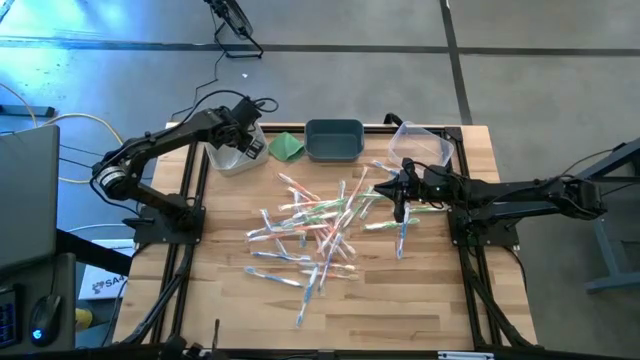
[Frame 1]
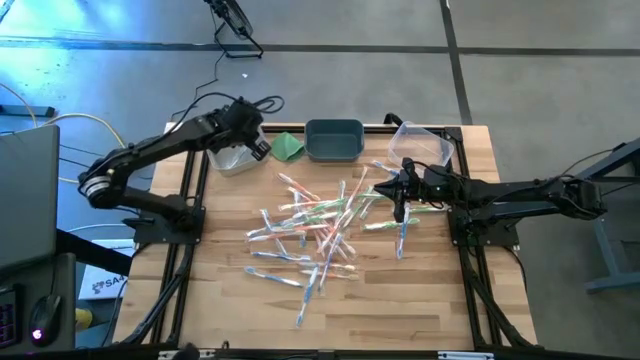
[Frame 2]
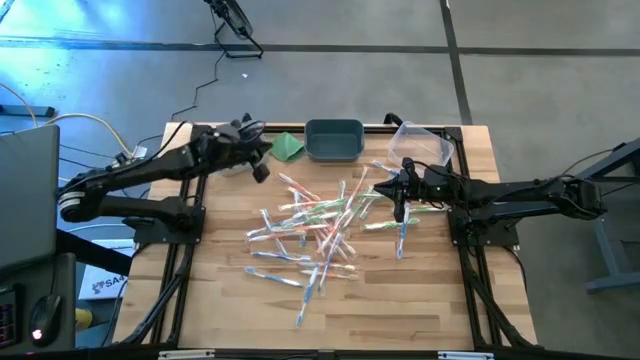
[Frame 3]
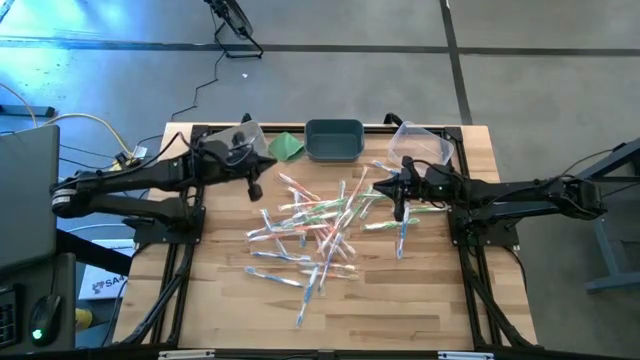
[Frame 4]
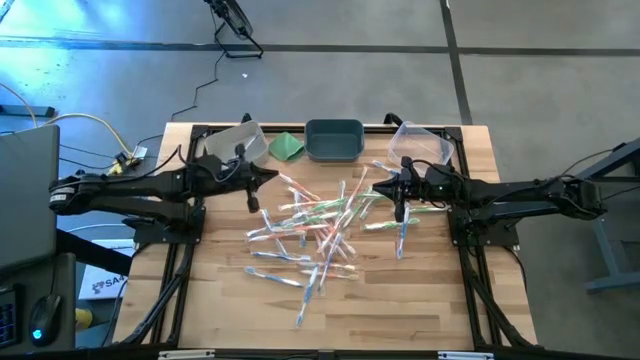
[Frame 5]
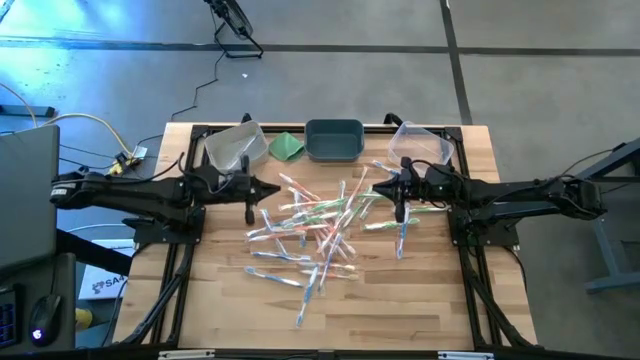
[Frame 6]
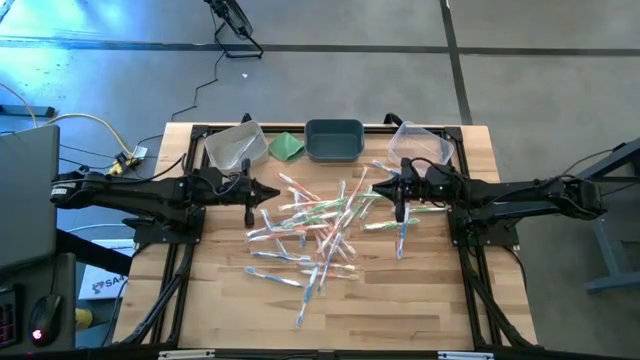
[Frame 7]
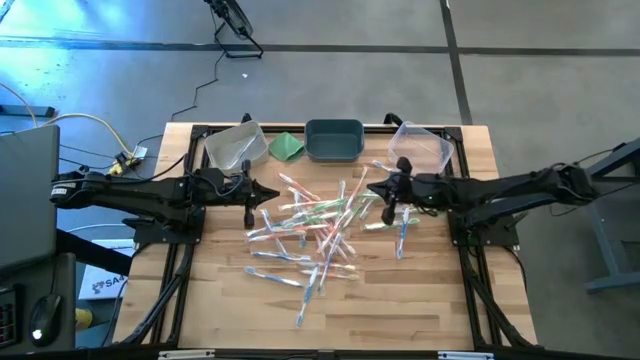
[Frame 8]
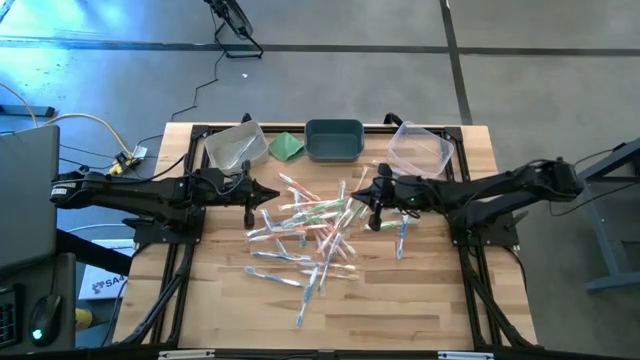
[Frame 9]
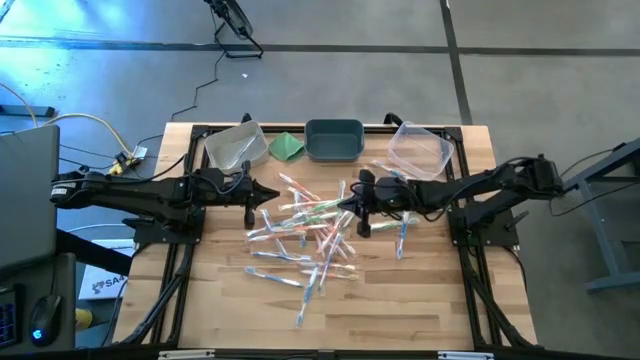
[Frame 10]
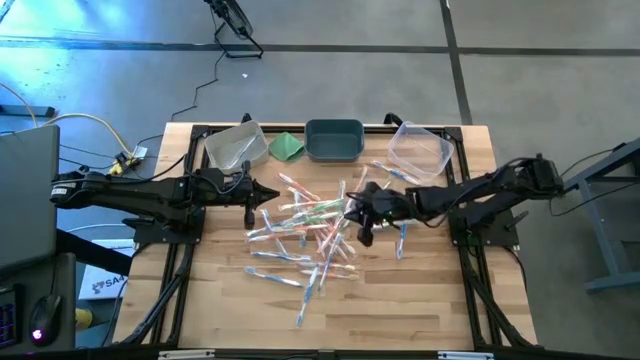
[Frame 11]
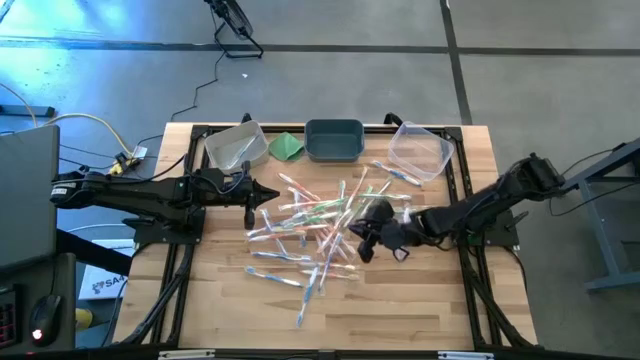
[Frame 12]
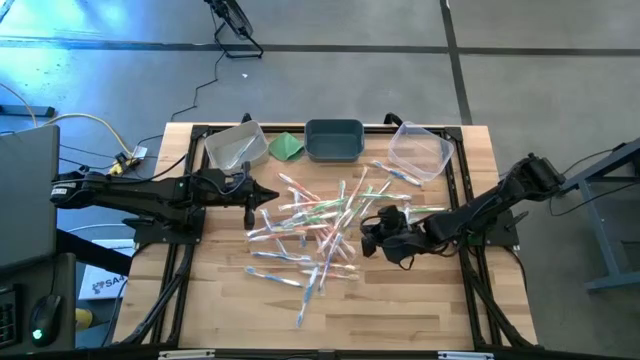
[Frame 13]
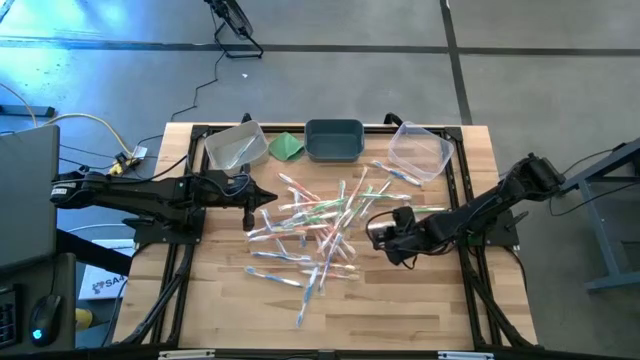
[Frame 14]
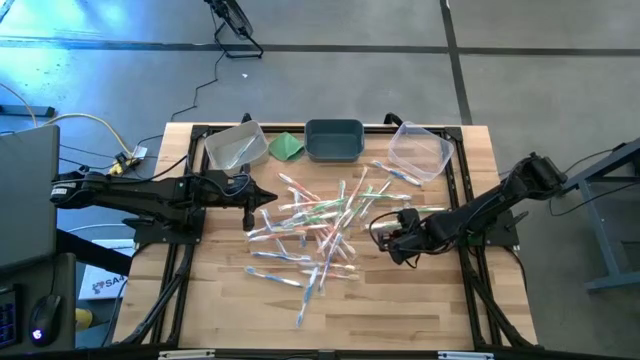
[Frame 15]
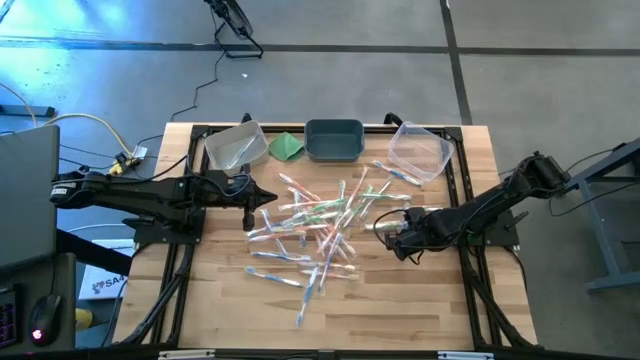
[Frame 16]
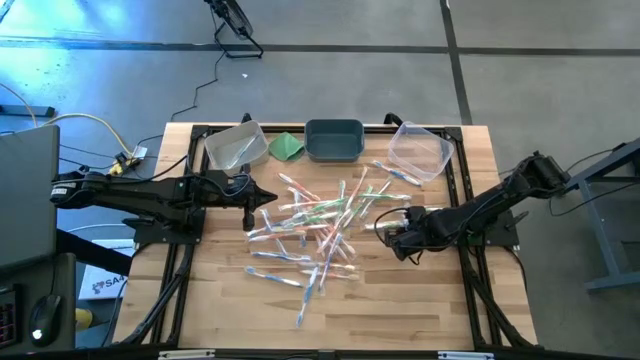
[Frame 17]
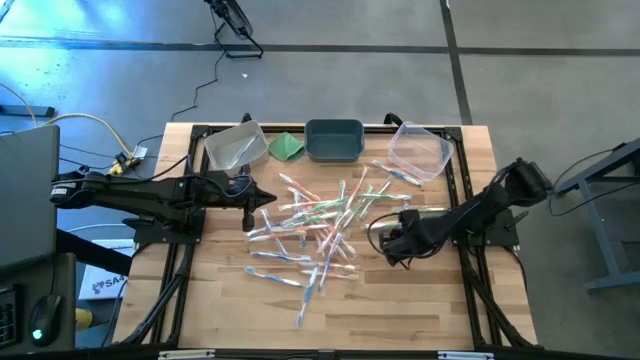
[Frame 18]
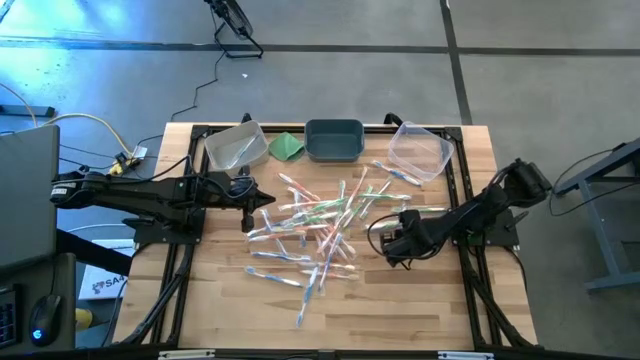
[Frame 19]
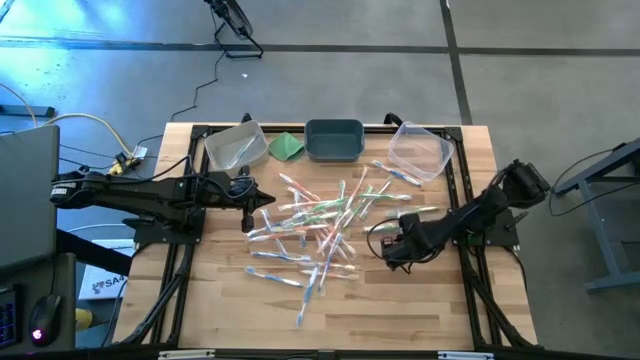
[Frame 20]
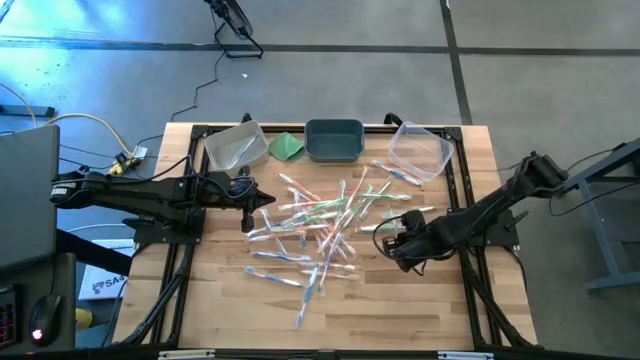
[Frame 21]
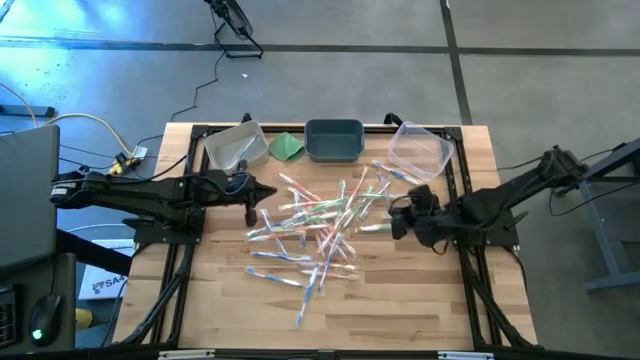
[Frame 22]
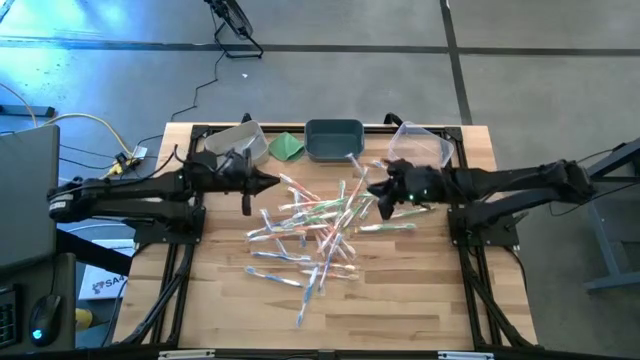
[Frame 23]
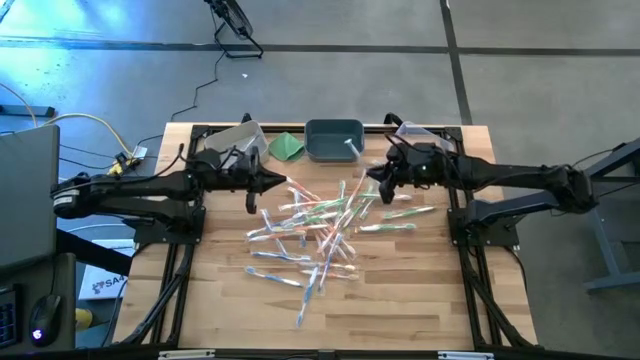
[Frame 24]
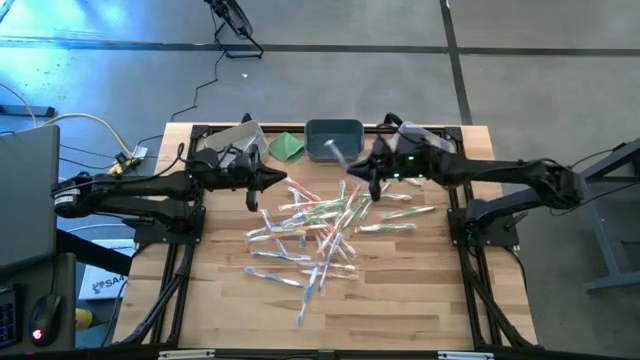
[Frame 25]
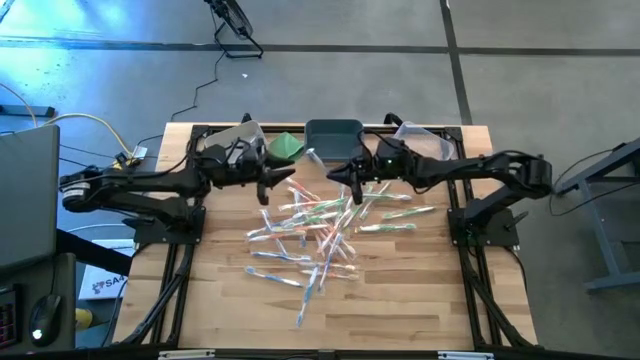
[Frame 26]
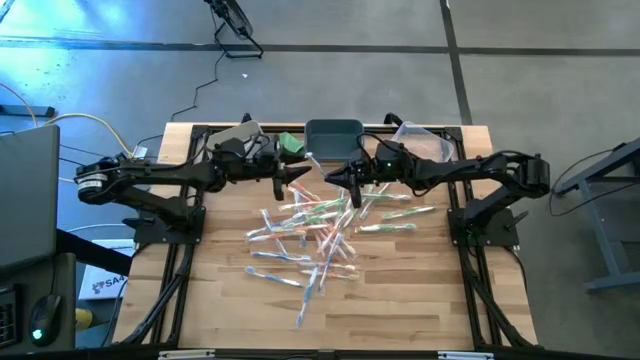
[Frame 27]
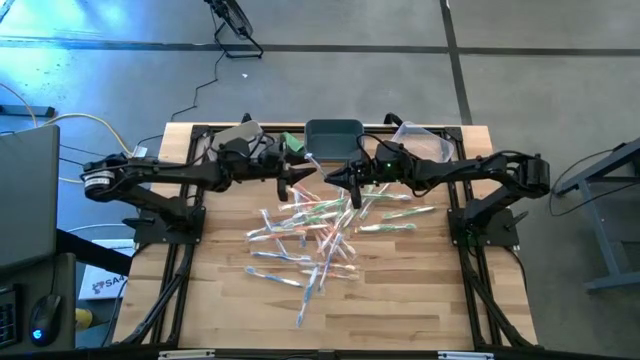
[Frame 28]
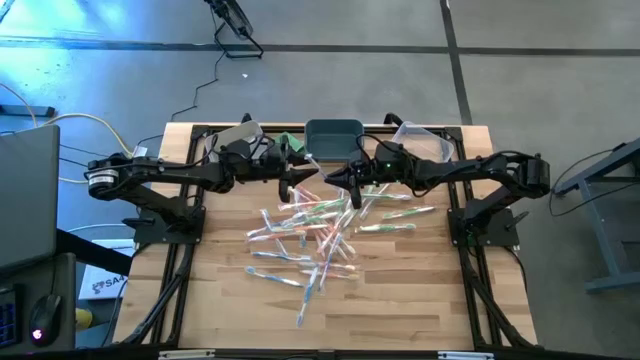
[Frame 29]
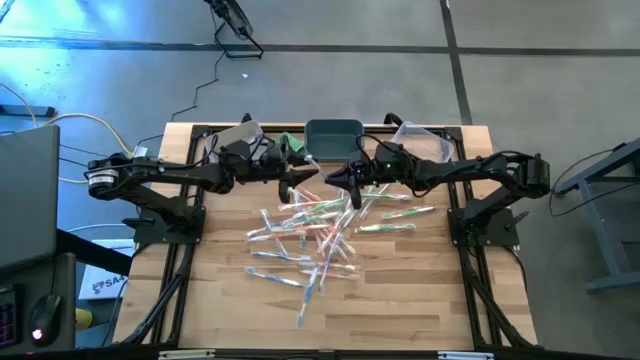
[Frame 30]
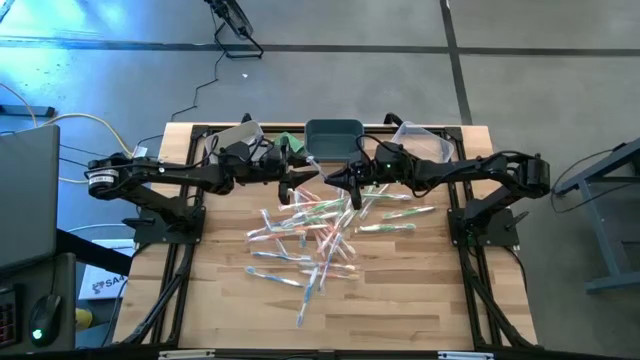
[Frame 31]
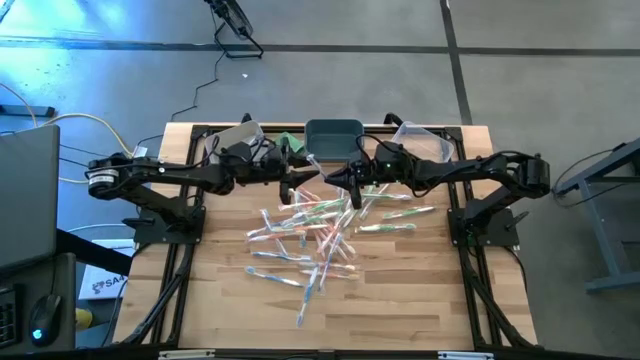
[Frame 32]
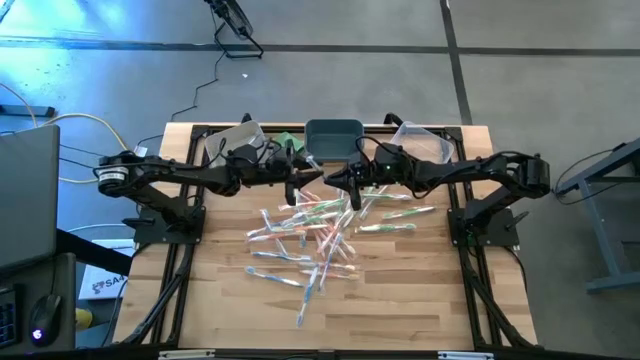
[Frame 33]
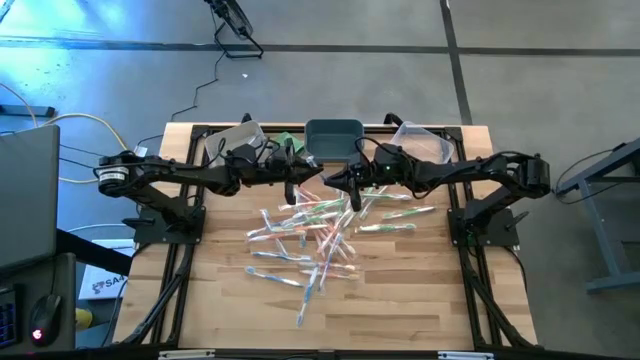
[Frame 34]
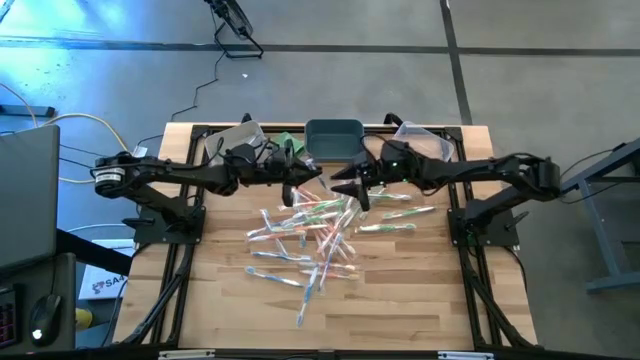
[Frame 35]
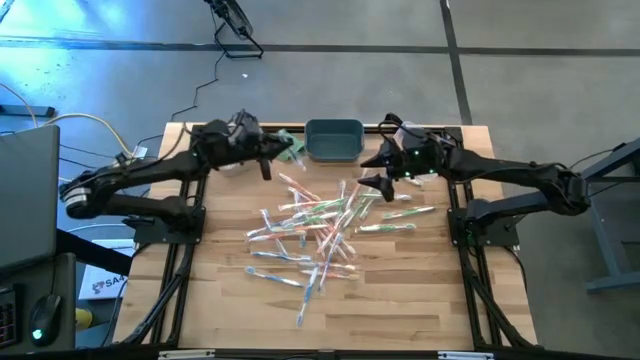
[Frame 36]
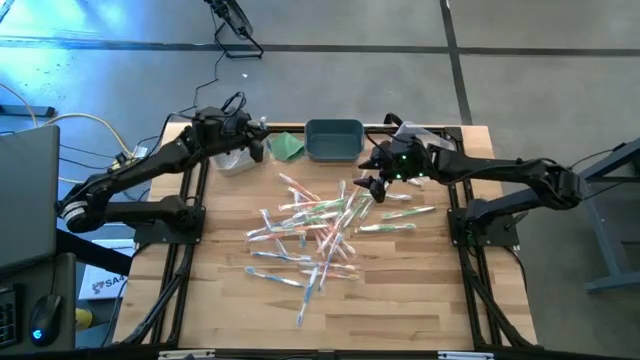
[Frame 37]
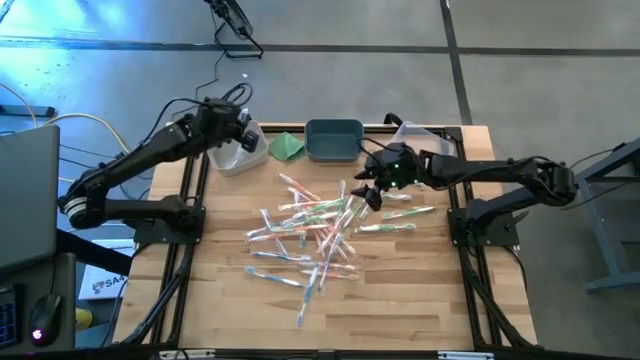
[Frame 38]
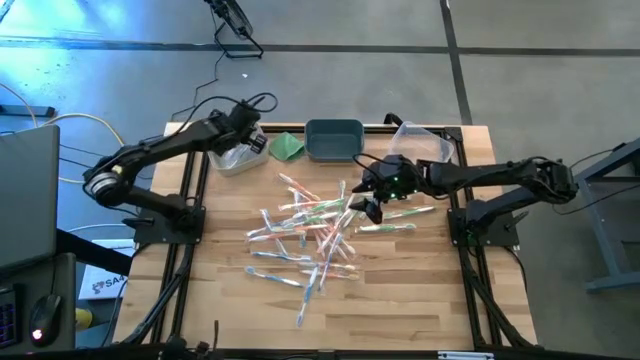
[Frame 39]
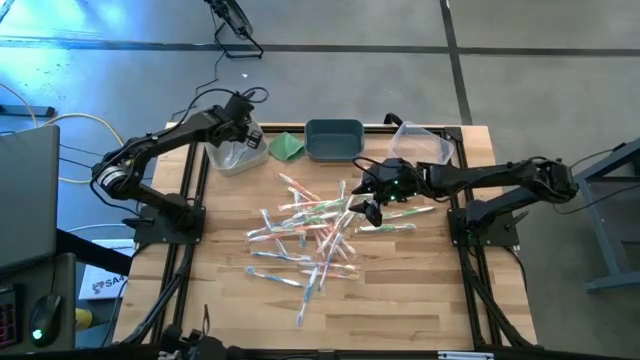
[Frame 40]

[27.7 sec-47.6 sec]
Task: Pick & Place Toothbrushes
Put the blue toothbrush into the gray bin
